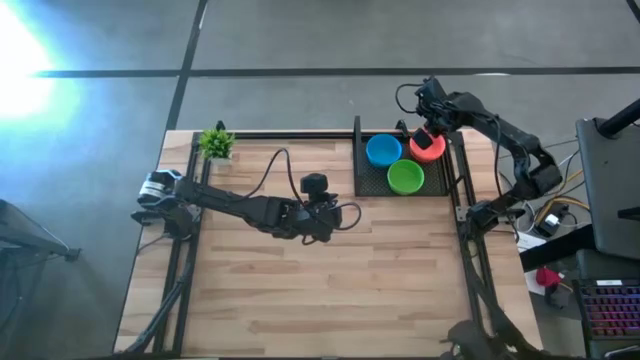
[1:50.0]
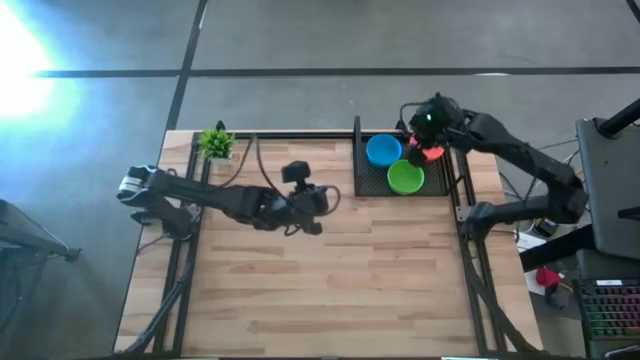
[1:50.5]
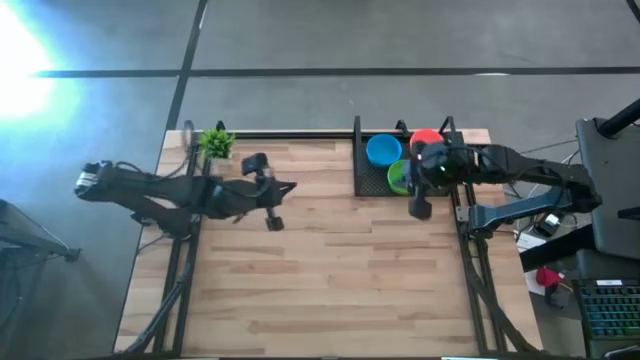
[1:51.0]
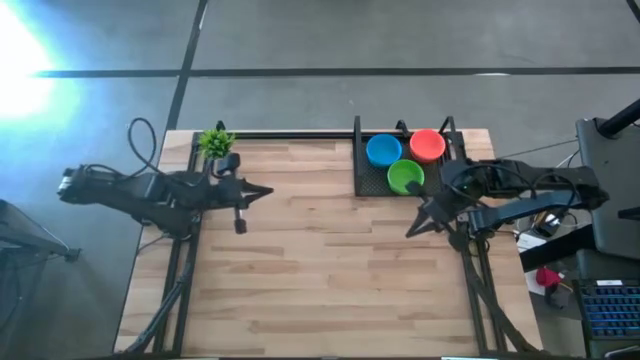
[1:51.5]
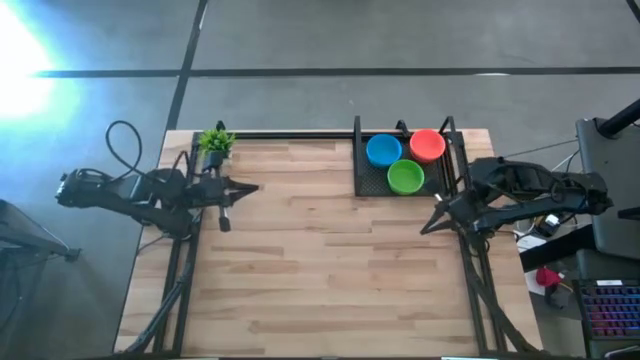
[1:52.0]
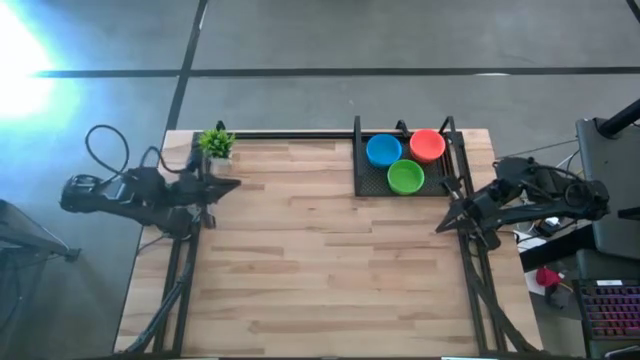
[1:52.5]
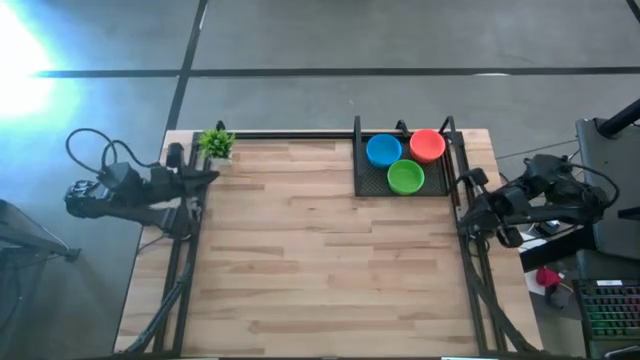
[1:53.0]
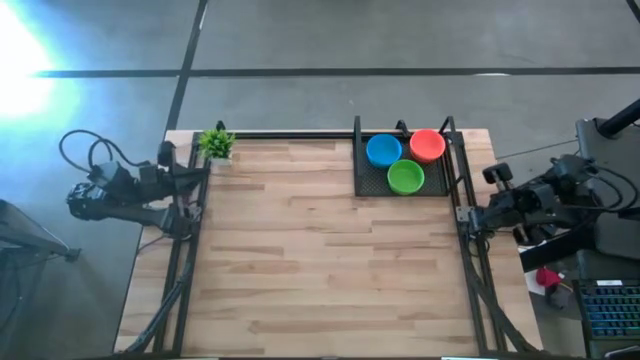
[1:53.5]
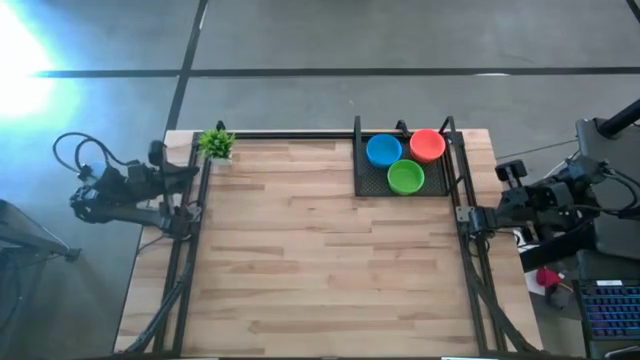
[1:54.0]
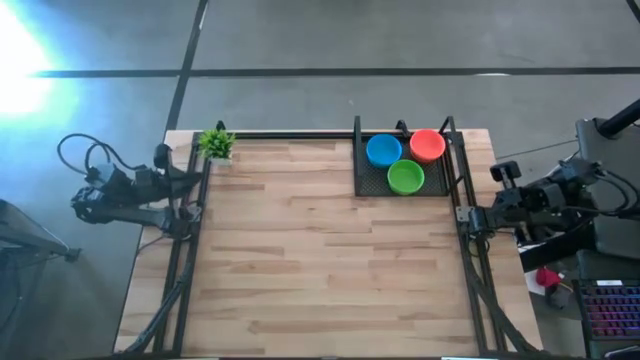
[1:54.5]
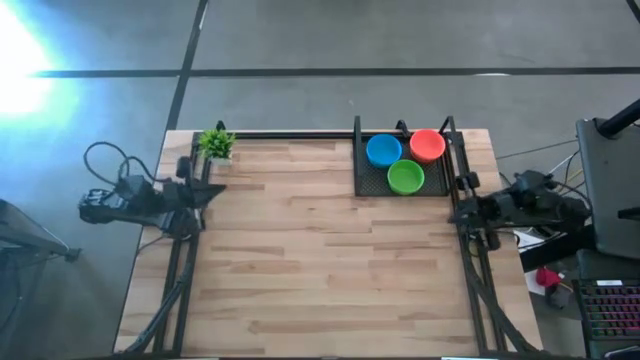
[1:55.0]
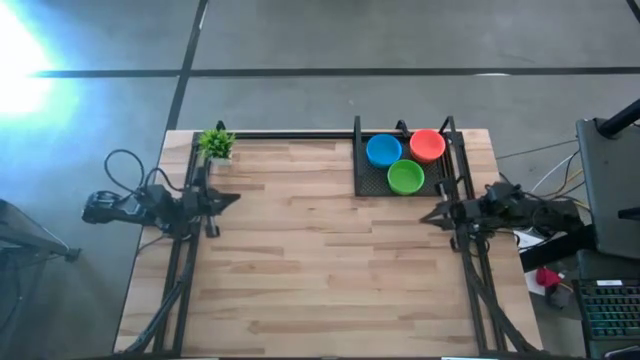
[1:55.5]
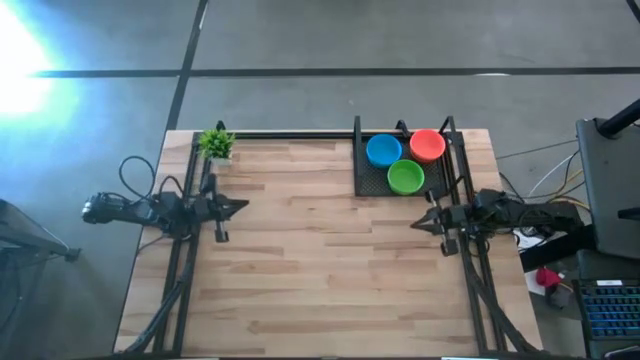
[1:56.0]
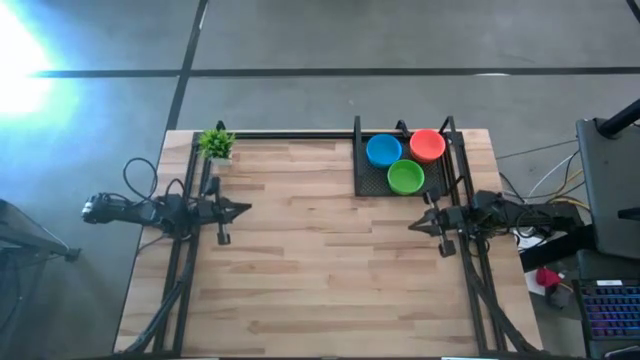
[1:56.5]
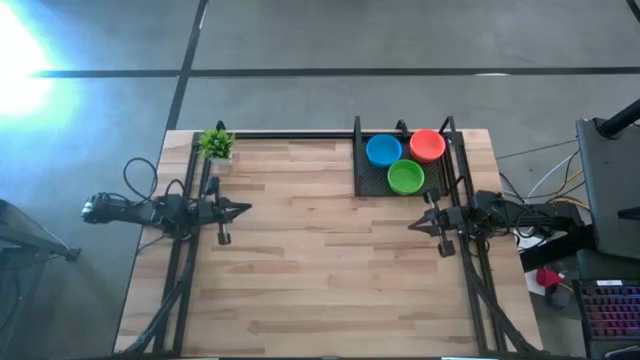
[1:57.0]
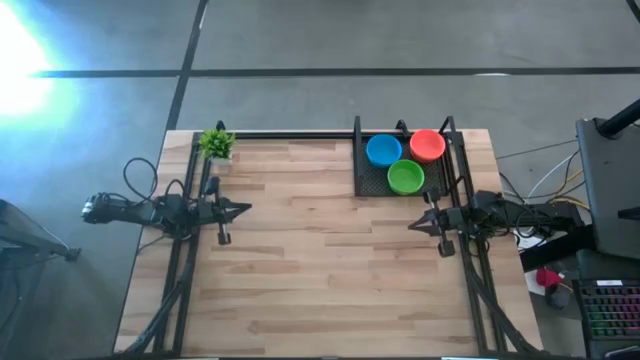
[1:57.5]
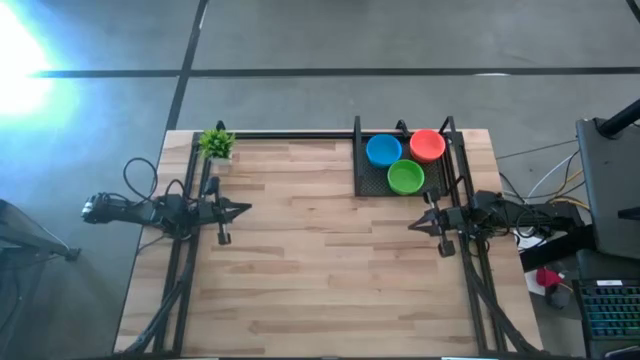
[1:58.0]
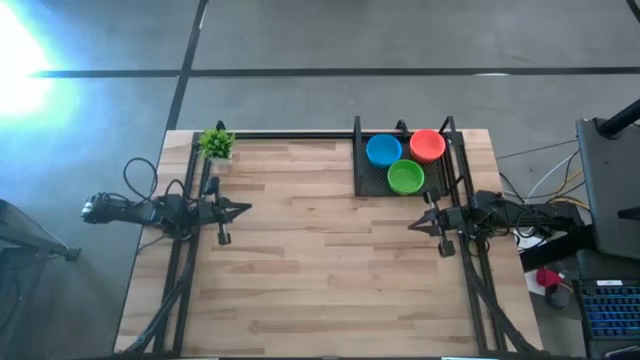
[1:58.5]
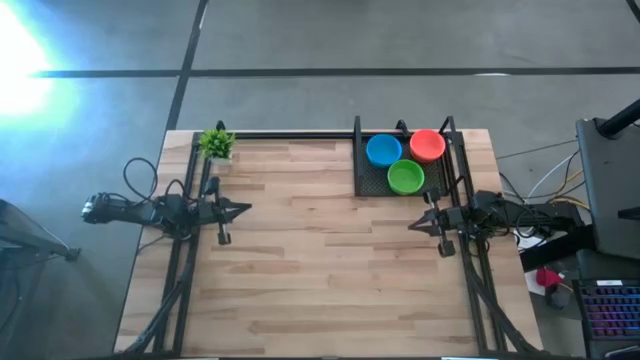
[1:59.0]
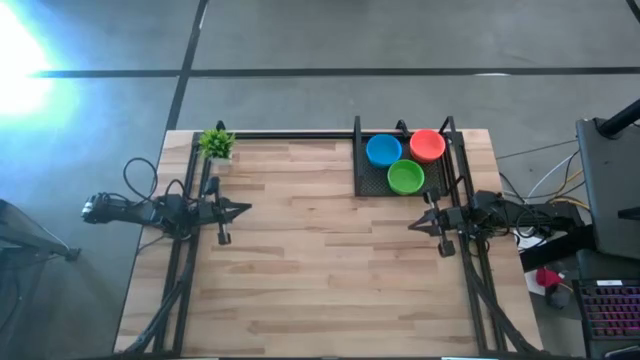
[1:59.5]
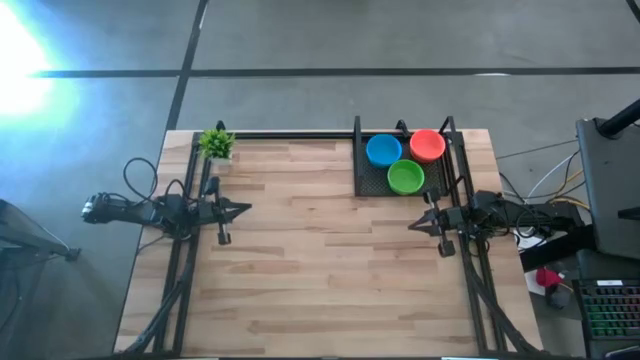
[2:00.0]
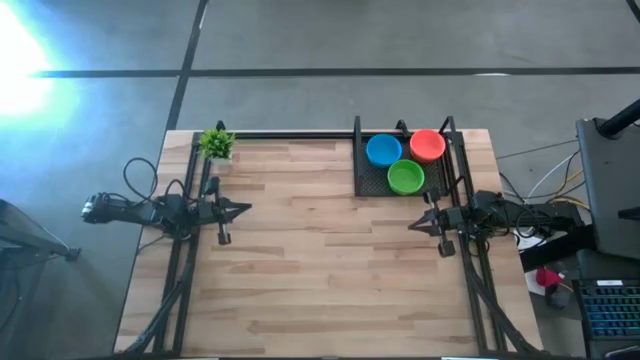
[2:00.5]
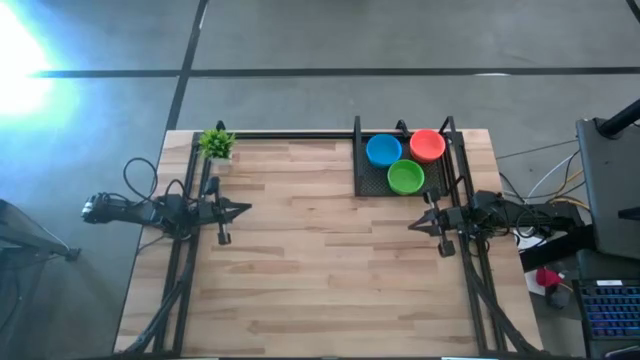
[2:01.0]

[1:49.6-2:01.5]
Task: Pick & Place Mini bowls
Return to Home Position

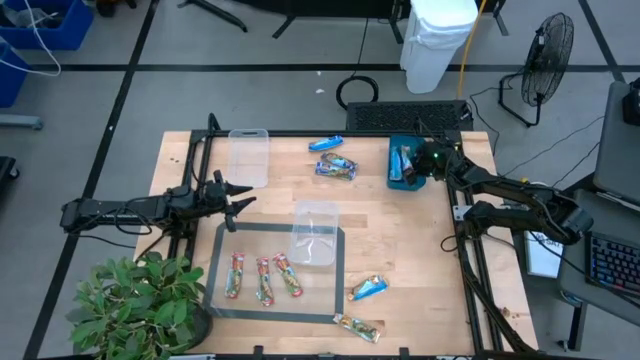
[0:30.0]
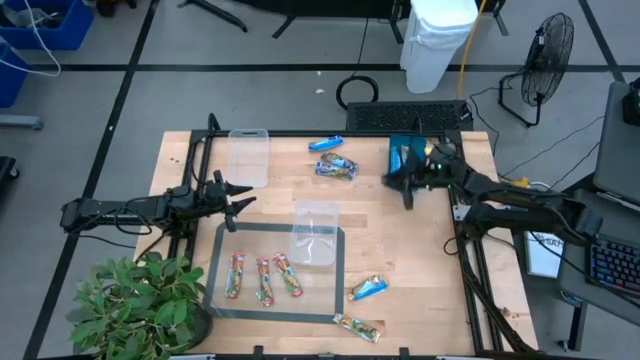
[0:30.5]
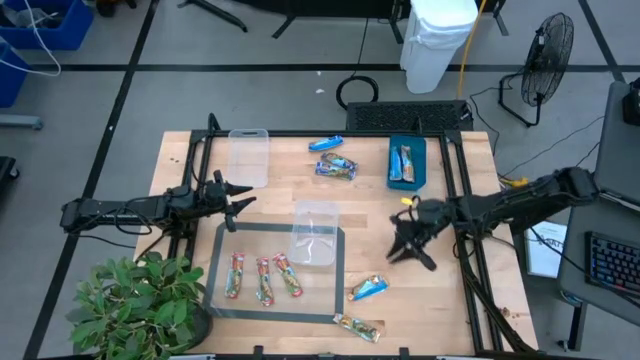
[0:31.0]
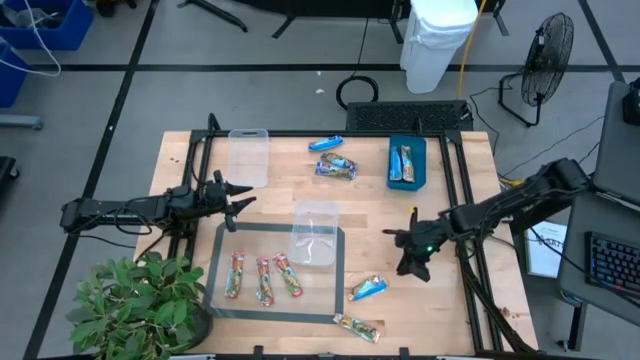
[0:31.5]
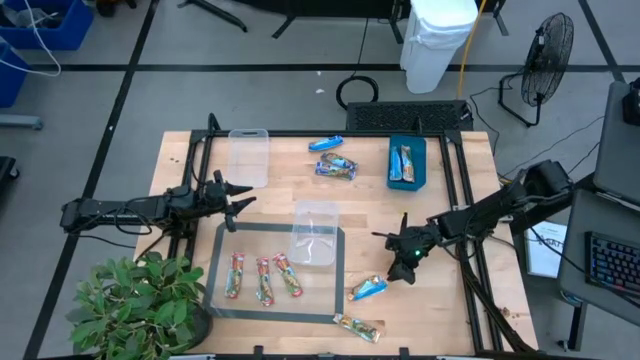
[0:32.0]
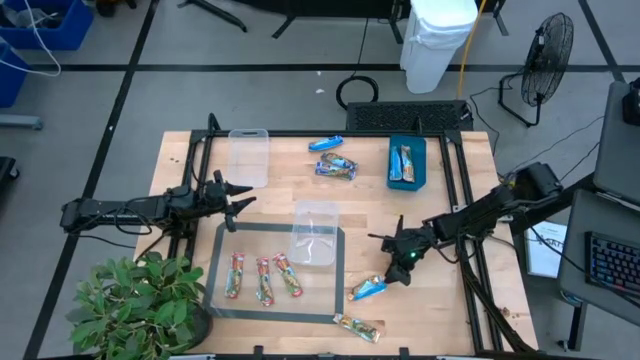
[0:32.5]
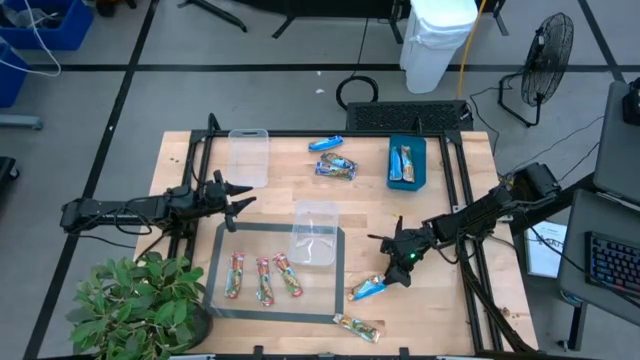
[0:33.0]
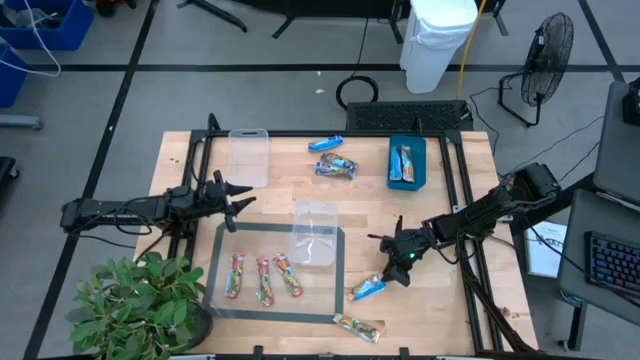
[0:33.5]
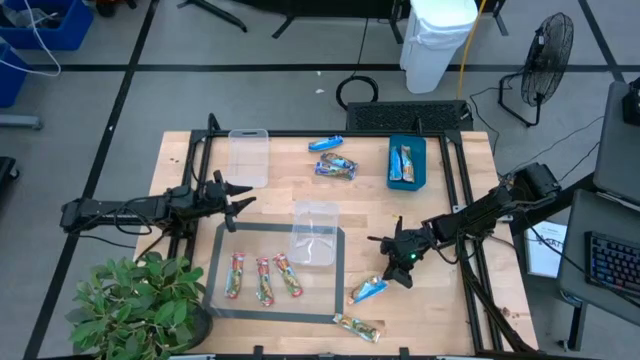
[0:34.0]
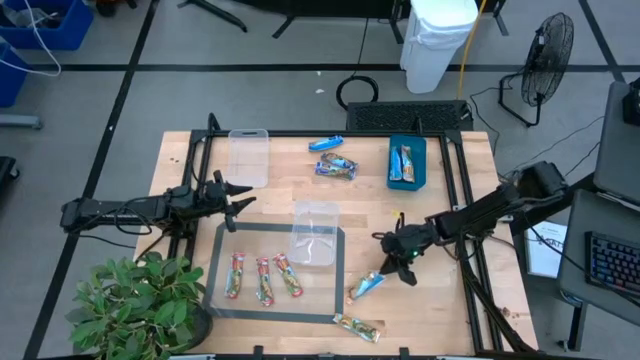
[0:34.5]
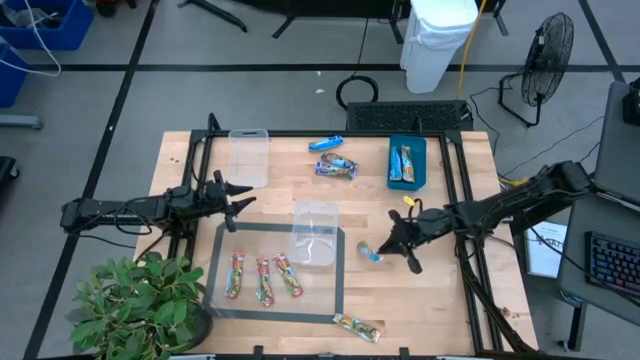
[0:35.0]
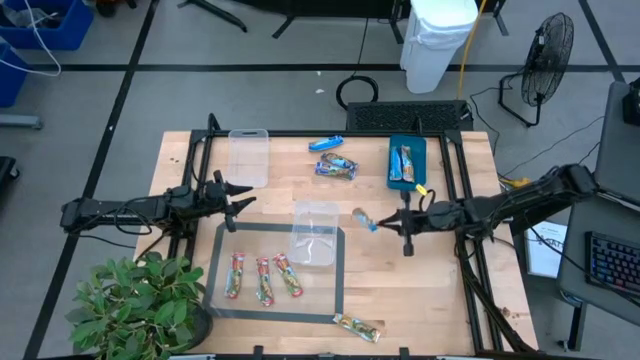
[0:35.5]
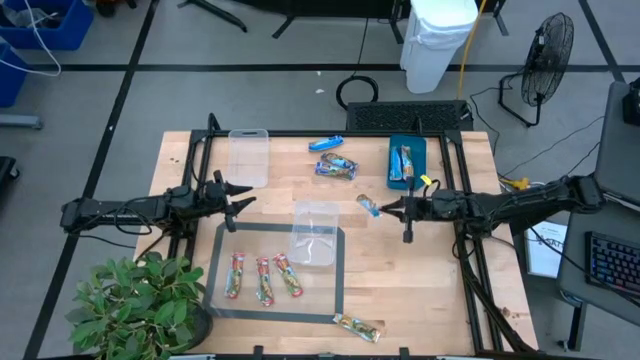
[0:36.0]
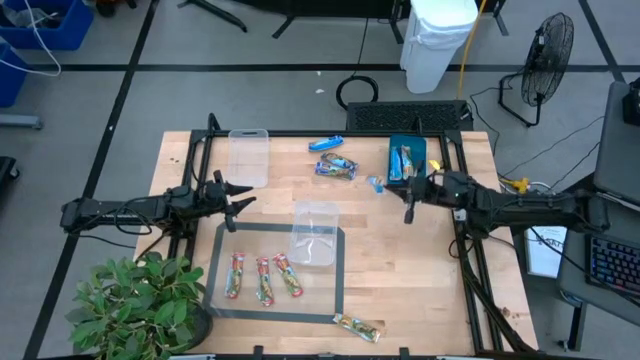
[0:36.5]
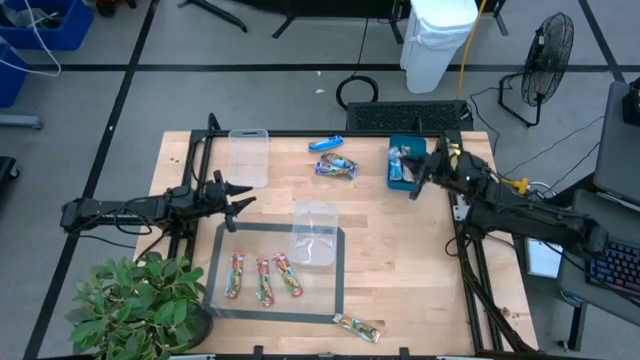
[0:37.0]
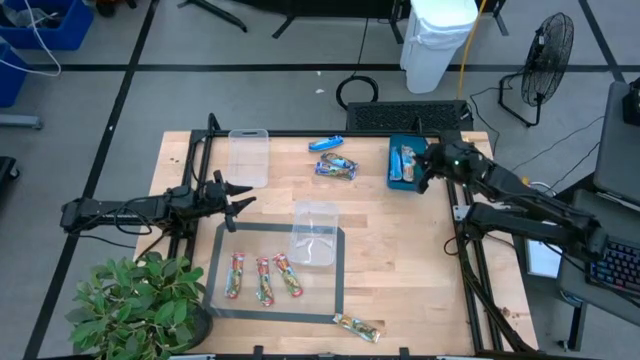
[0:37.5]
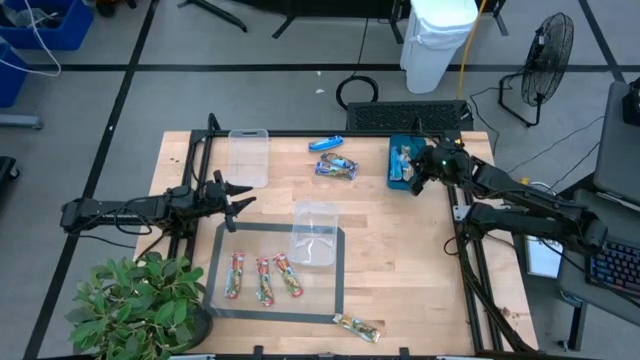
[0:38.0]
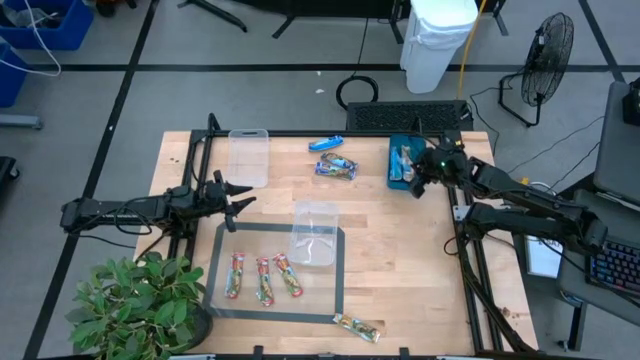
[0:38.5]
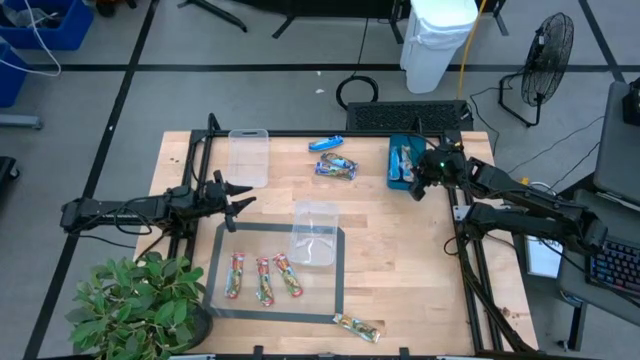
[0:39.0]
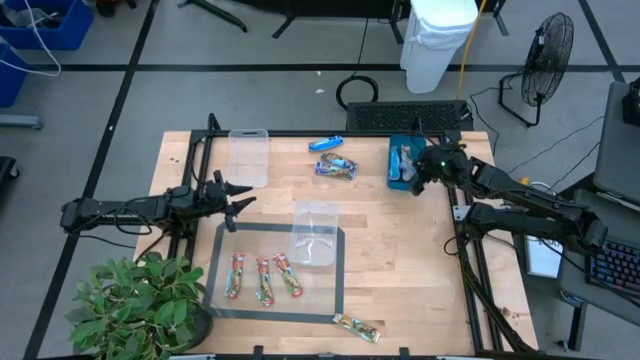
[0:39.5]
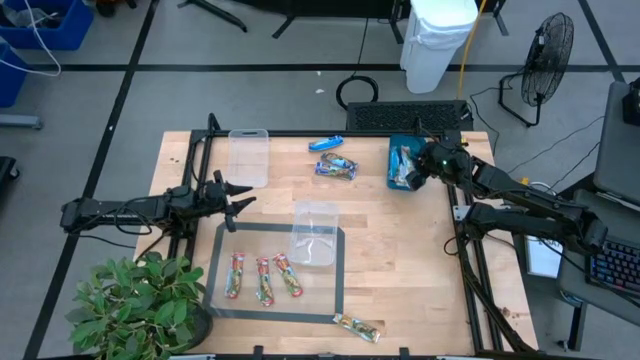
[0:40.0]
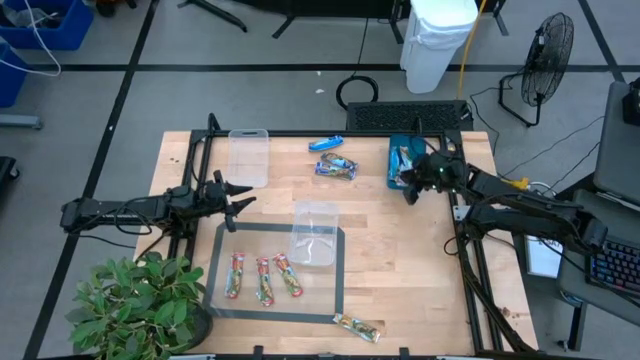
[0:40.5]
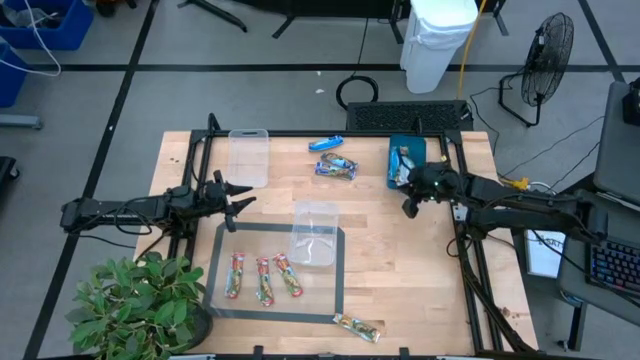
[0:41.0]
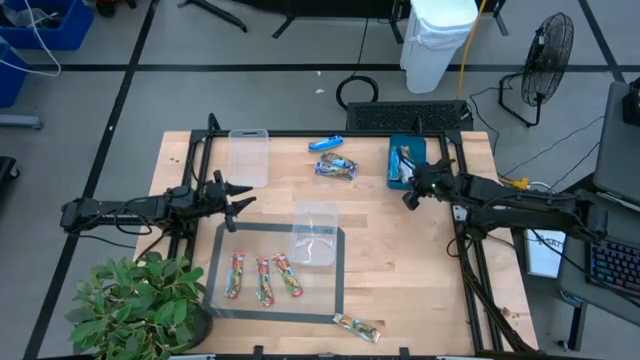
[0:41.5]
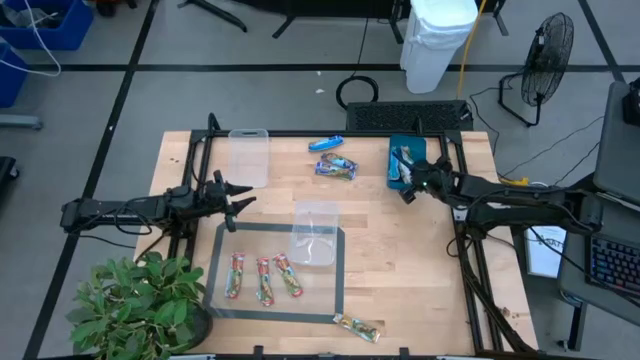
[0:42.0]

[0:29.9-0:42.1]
Task: Pick and place Granola Bars by type
Put the yellow granola bar into the blue bin
